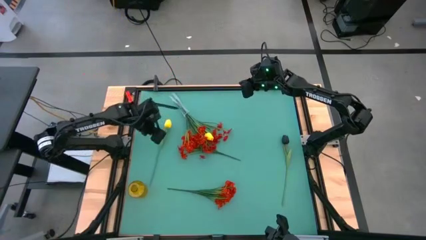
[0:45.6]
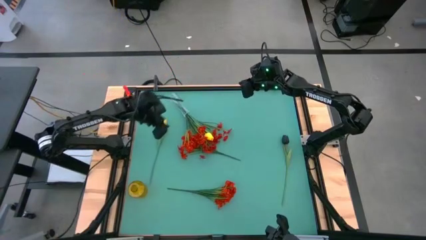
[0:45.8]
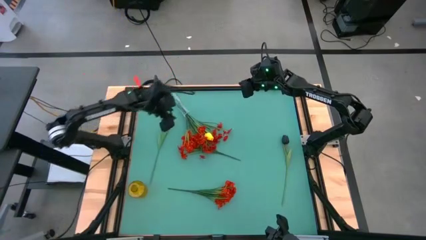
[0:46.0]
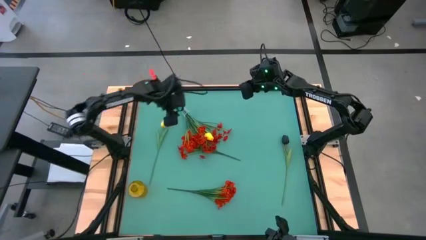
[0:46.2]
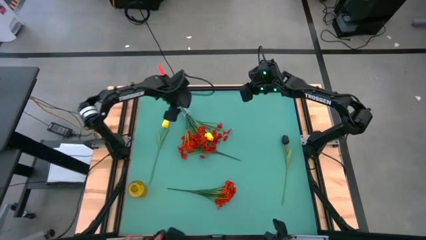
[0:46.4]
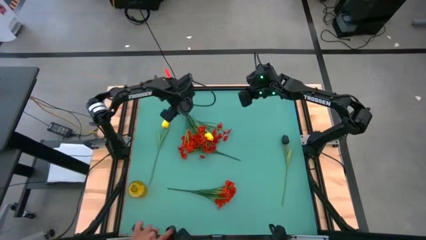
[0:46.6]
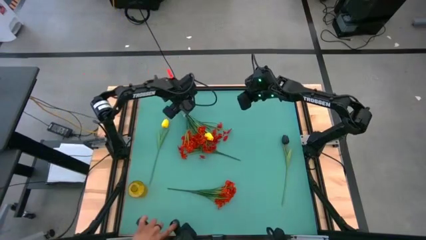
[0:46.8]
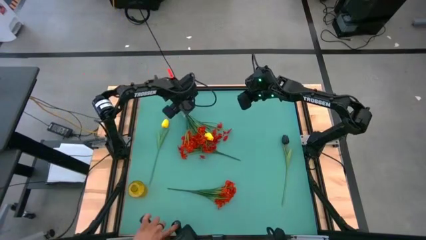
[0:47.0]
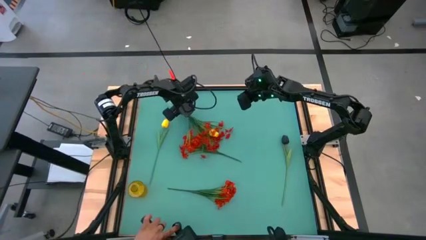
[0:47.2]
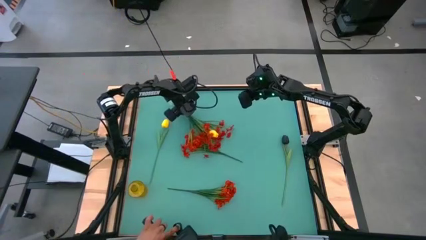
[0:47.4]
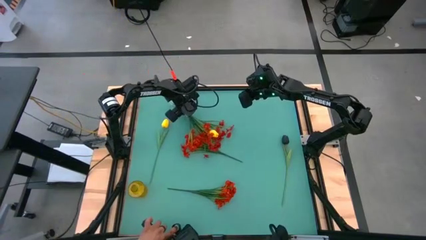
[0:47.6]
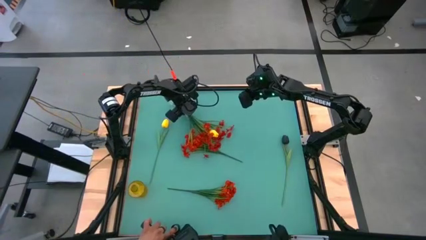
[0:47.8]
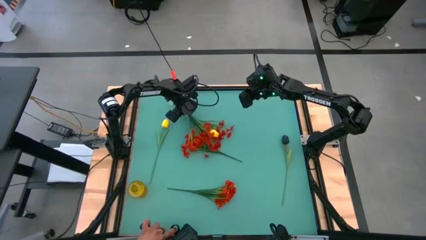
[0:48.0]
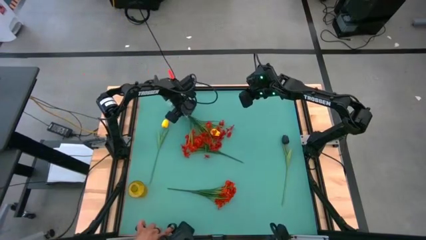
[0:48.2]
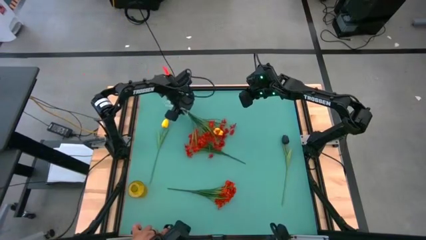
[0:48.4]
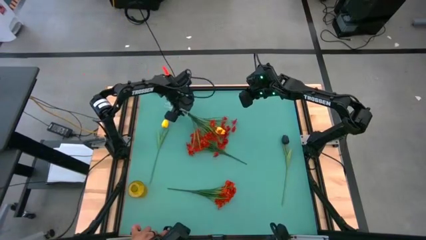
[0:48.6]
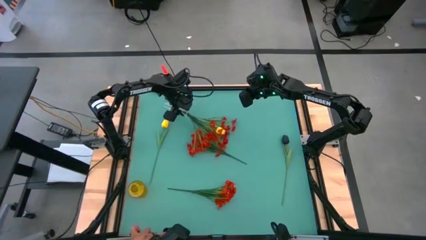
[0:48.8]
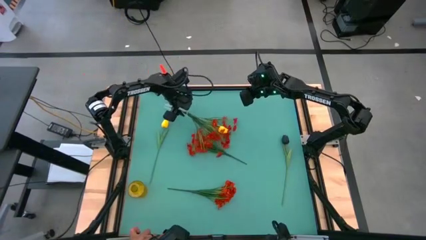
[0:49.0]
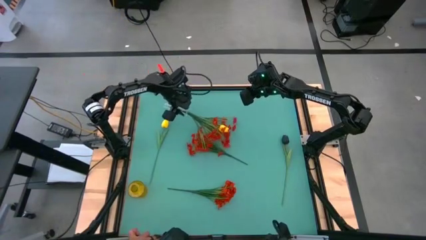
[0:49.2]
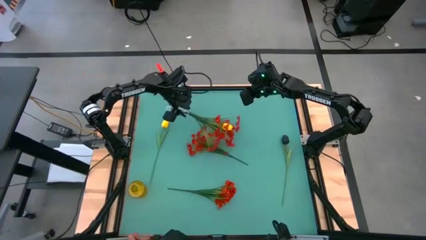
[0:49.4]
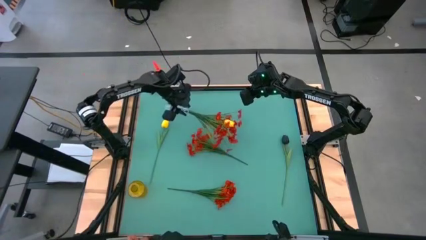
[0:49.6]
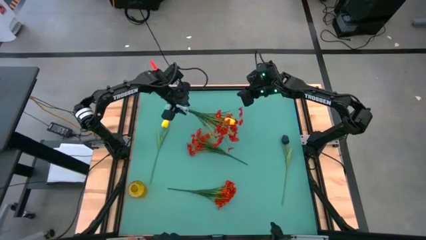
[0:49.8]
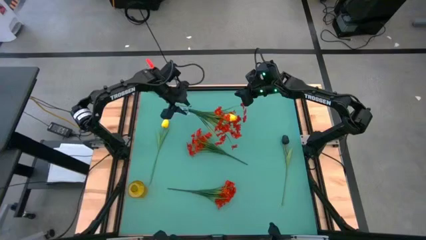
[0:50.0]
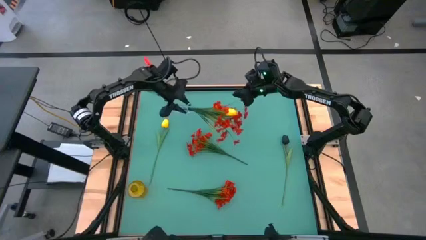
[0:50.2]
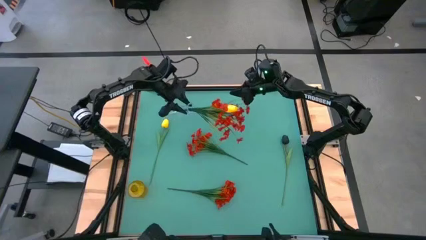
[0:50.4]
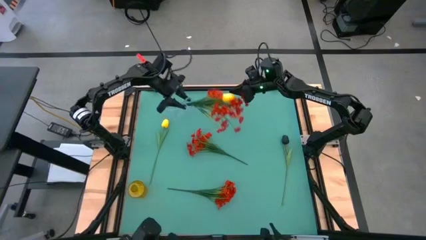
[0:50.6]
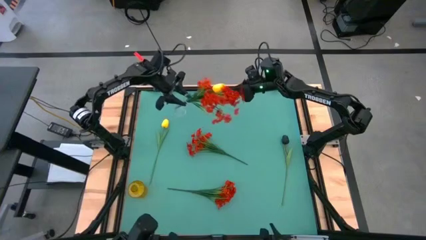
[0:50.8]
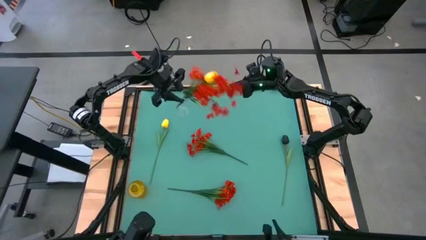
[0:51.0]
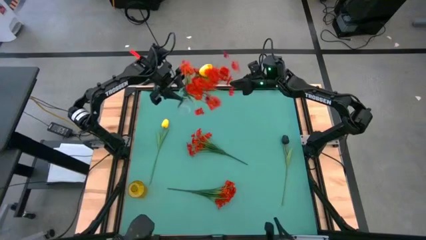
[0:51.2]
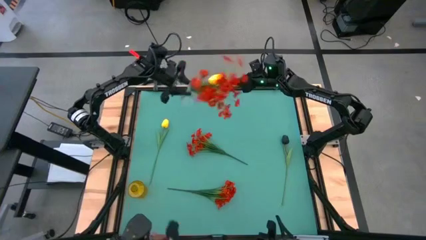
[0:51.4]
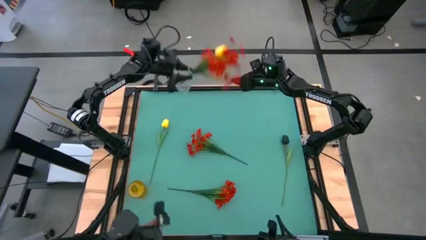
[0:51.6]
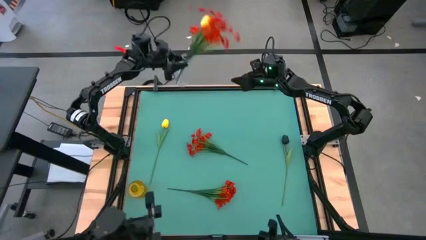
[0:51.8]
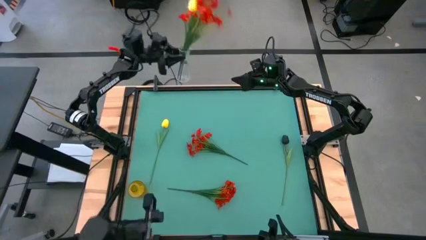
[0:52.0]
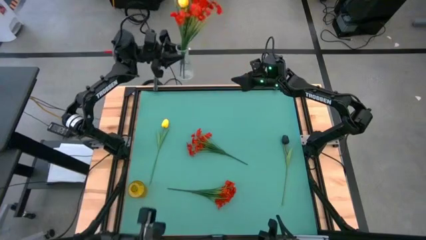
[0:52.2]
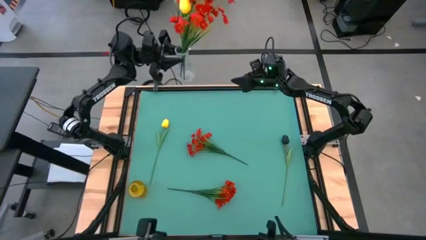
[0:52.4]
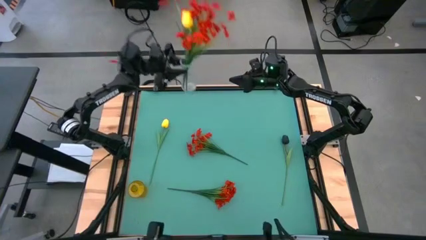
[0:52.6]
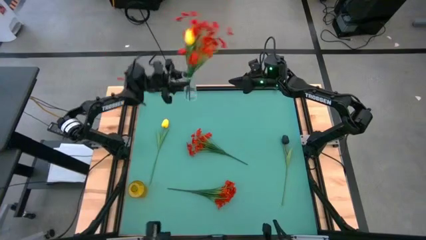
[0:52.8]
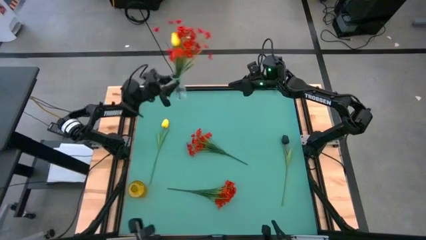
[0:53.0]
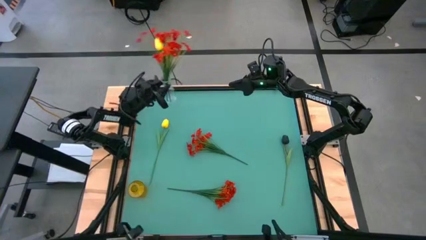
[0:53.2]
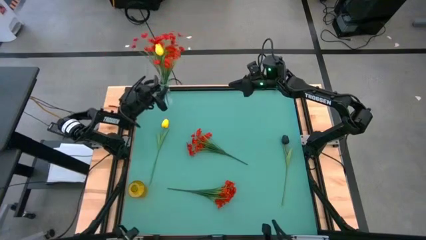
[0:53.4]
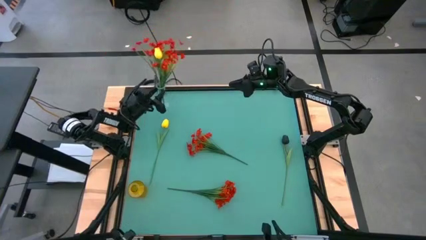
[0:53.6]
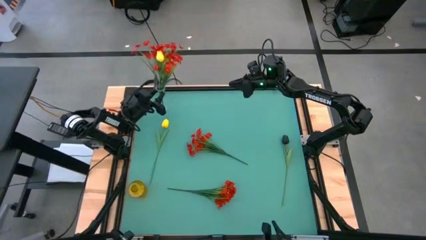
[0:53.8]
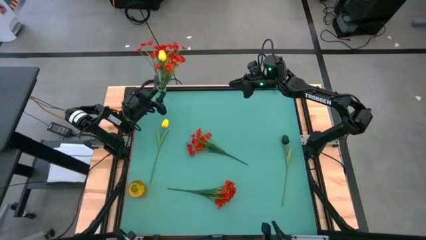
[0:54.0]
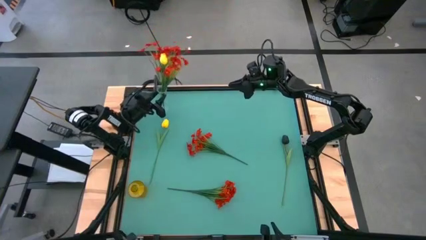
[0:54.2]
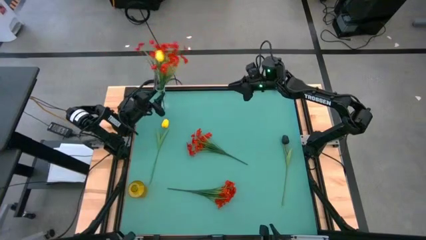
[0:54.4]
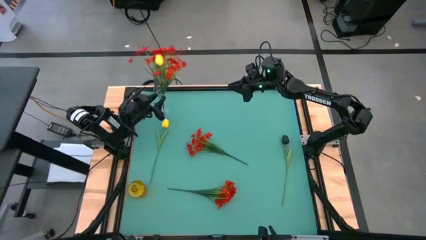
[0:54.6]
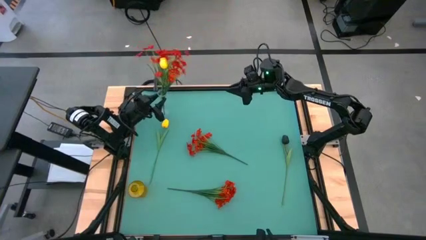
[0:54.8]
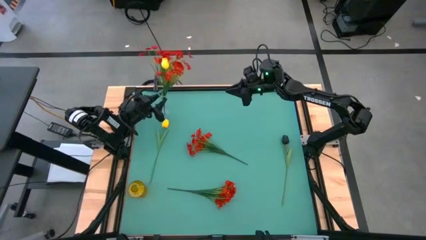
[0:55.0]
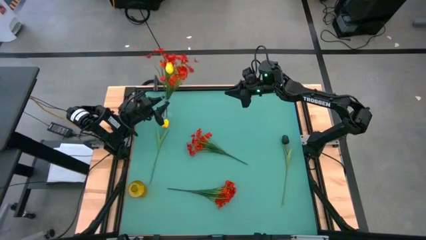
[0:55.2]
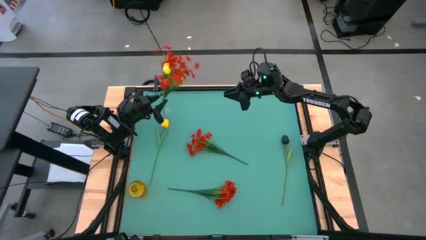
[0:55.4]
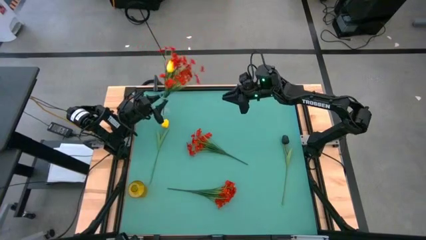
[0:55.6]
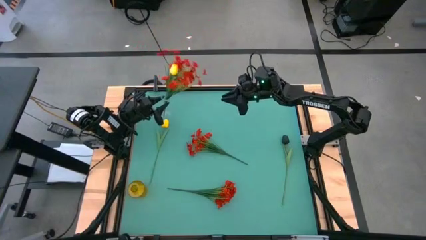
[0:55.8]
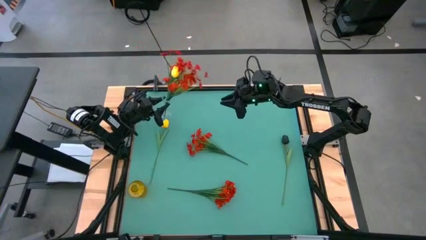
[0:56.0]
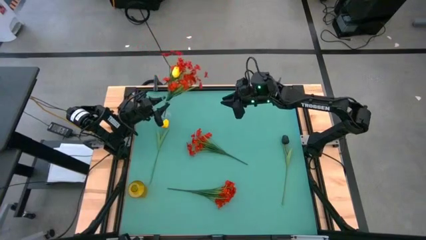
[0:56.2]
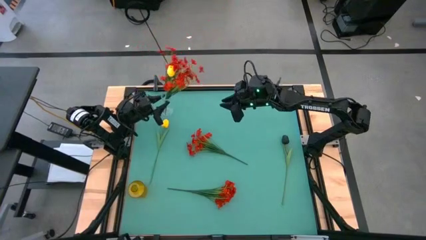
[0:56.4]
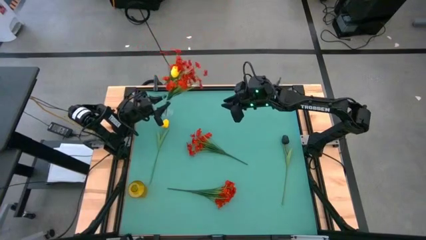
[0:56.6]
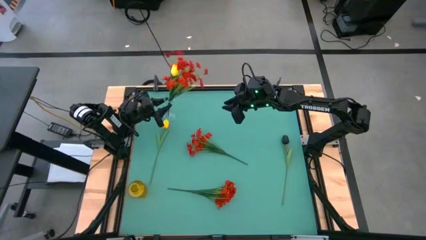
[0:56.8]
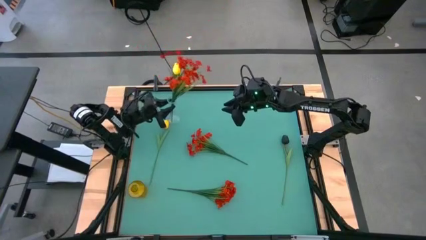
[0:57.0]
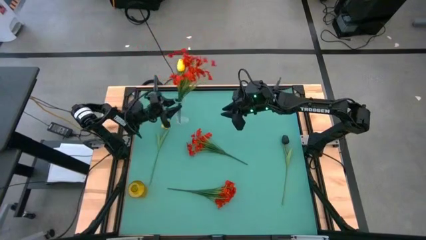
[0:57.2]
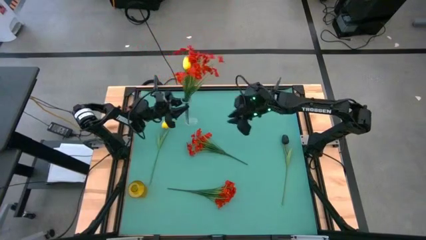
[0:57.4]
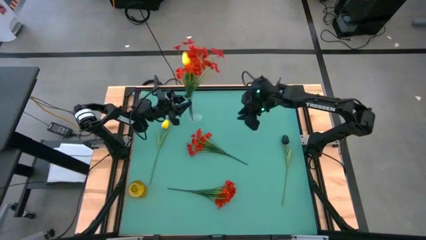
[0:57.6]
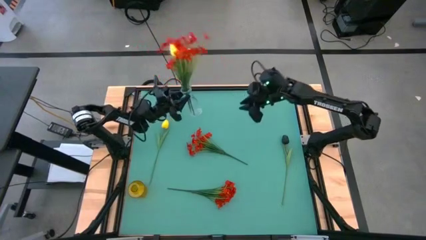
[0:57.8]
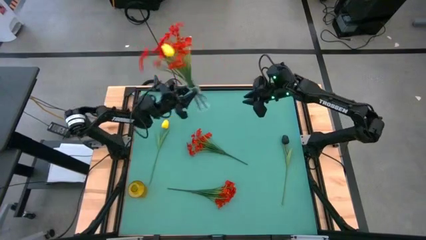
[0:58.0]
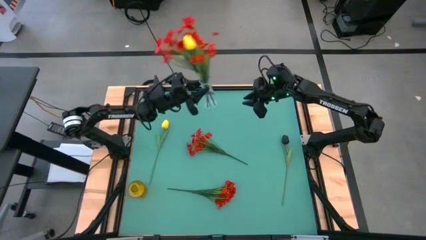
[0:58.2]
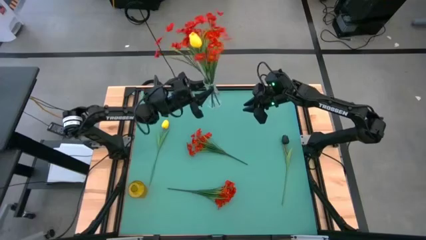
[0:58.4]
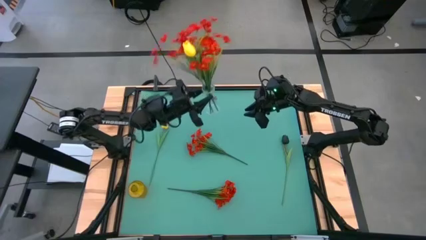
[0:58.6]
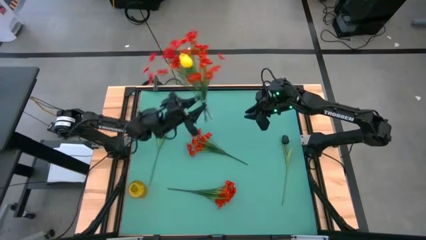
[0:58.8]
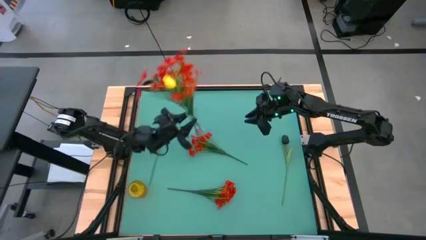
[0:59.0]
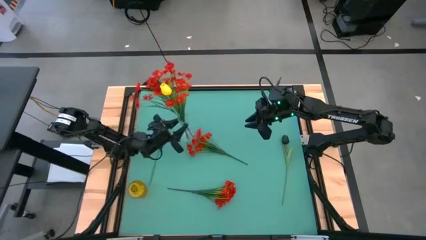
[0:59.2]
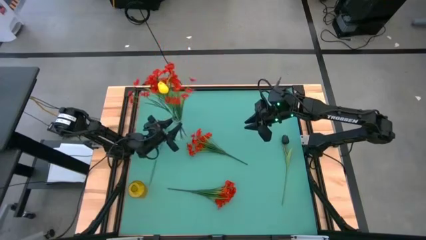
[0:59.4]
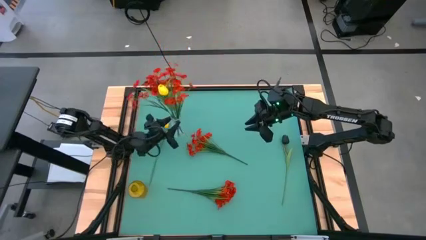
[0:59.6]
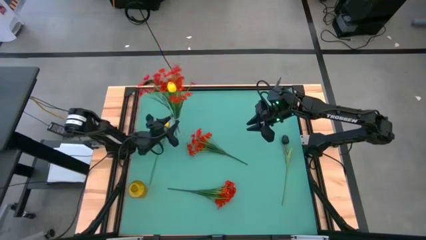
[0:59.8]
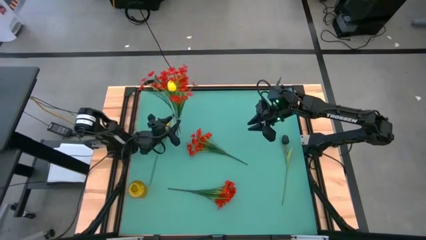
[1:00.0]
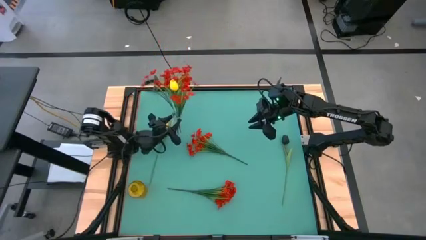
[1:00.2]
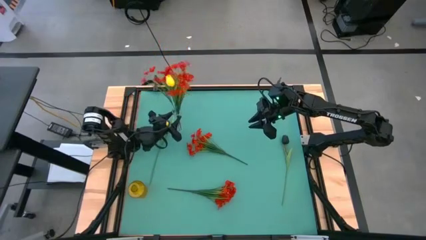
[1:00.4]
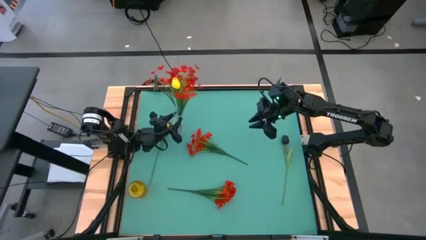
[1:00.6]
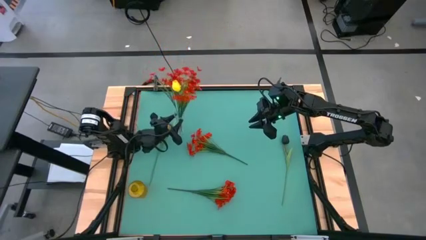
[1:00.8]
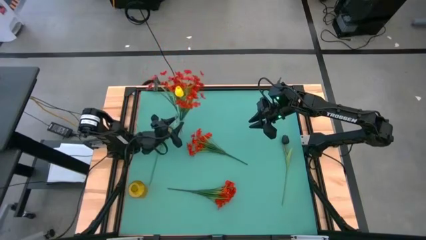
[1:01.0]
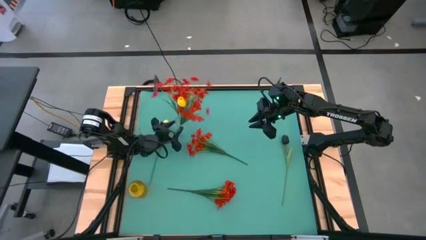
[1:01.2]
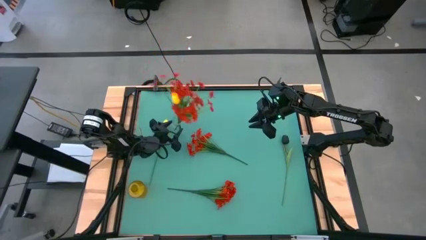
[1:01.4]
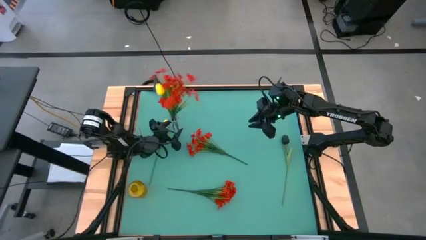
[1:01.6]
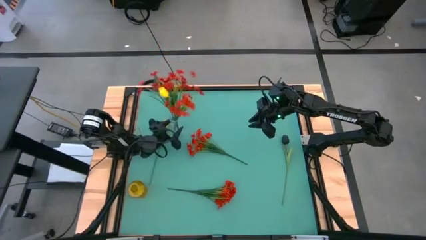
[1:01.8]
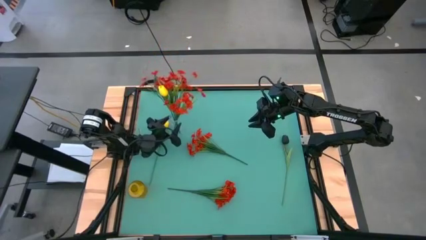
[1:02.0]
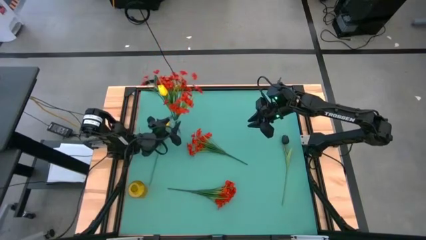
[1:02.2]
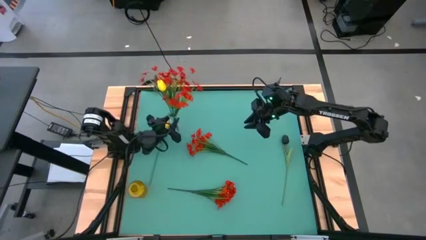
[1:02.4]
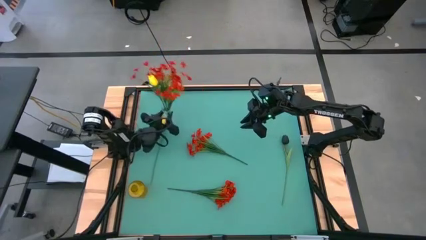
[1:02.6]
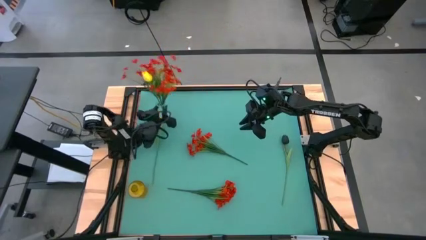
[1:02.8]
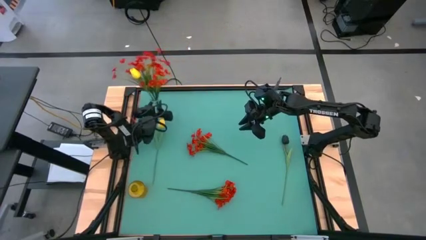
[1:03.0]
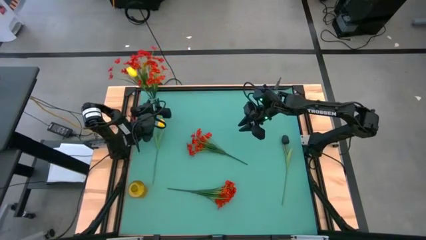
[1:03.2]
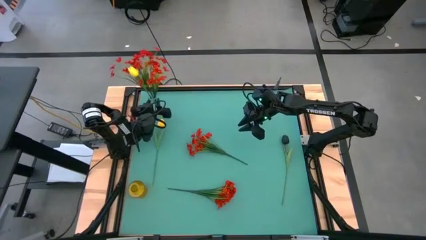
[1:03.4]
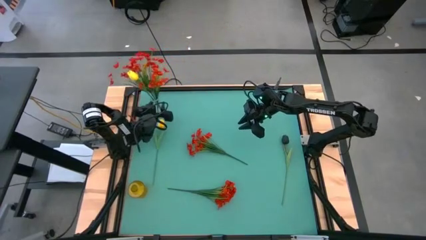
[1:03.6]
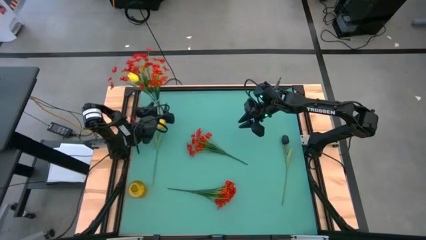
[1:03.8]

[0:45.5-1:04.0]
Task: Sort flowers into vase by color
Adjust the transparent vase on the table
